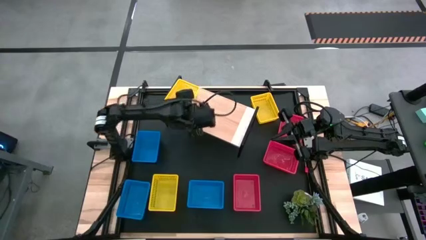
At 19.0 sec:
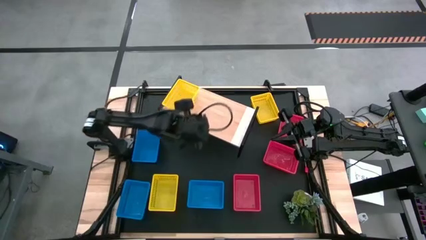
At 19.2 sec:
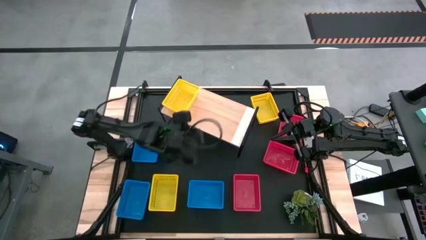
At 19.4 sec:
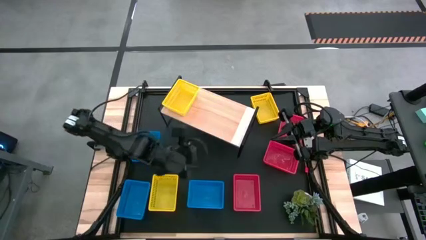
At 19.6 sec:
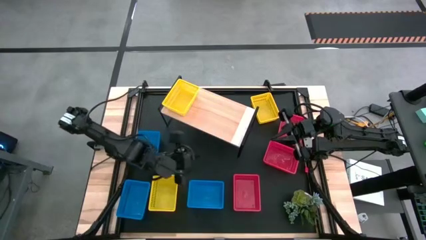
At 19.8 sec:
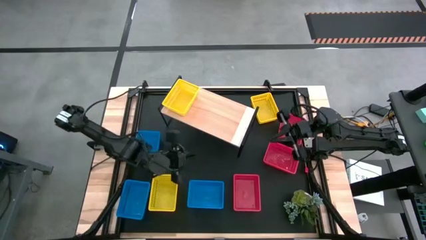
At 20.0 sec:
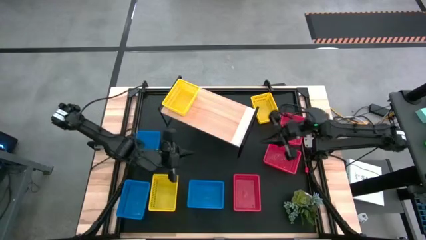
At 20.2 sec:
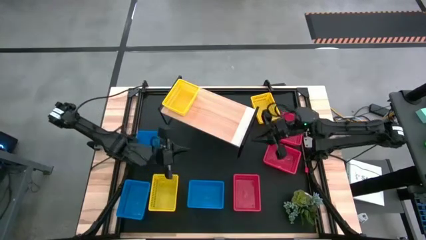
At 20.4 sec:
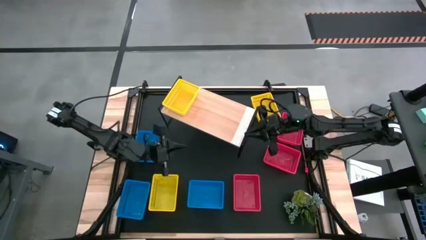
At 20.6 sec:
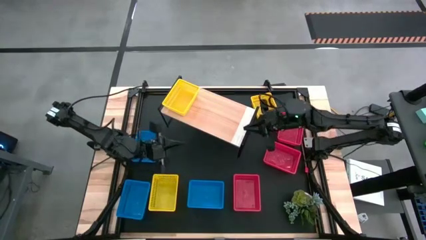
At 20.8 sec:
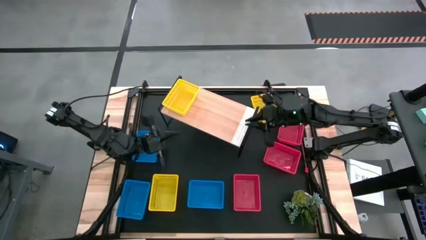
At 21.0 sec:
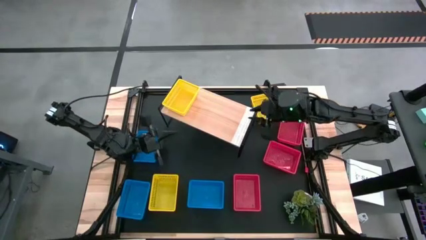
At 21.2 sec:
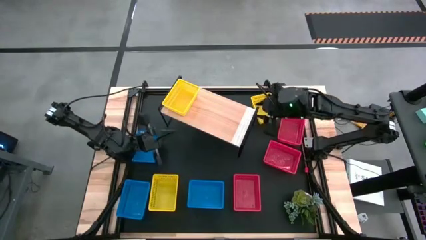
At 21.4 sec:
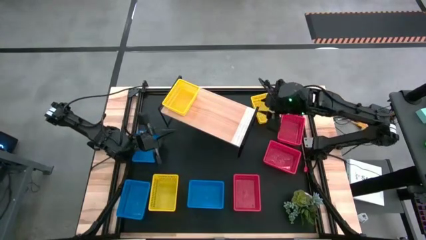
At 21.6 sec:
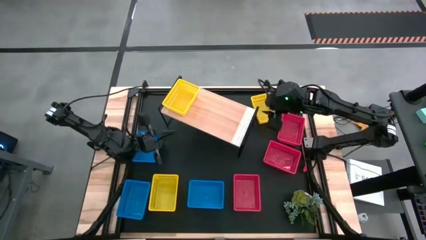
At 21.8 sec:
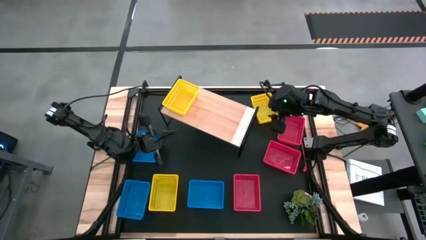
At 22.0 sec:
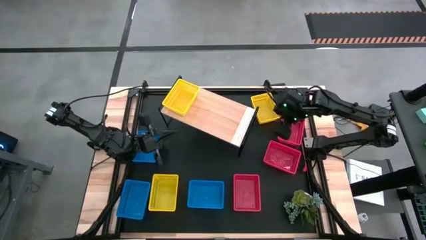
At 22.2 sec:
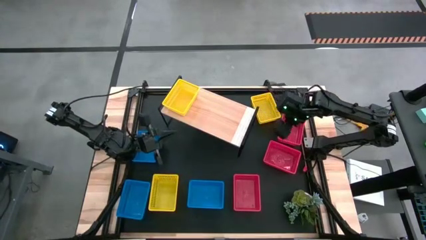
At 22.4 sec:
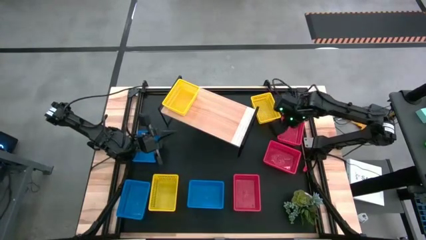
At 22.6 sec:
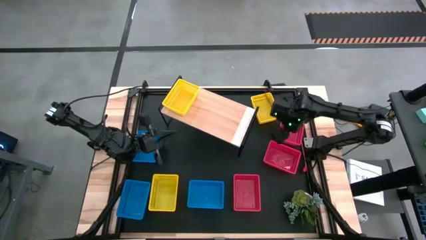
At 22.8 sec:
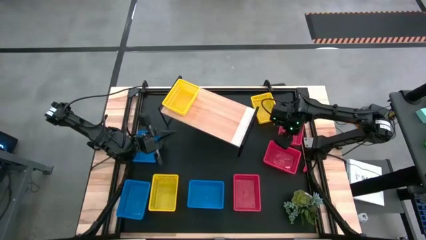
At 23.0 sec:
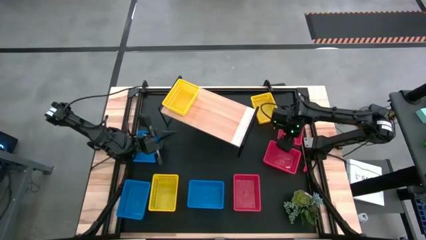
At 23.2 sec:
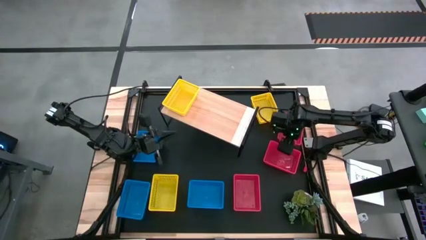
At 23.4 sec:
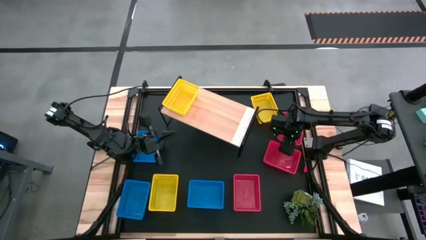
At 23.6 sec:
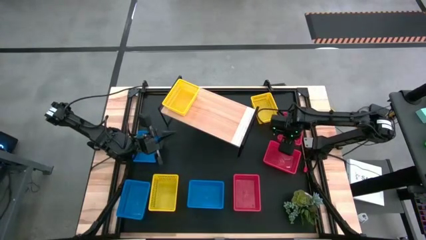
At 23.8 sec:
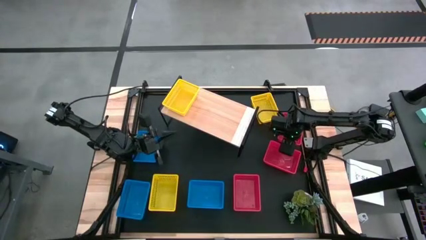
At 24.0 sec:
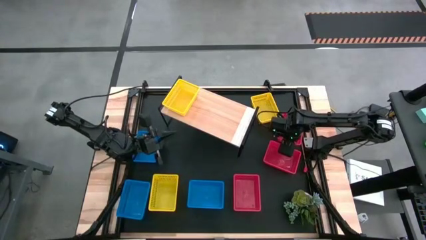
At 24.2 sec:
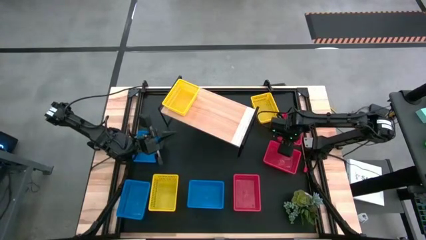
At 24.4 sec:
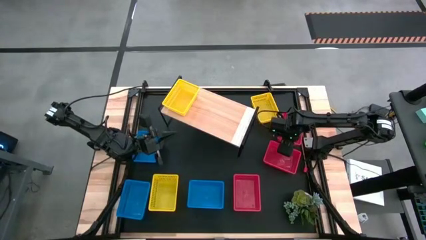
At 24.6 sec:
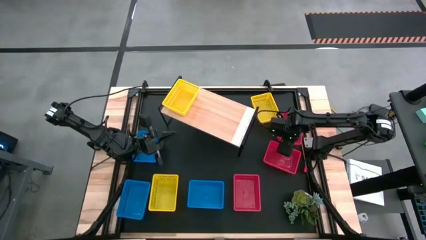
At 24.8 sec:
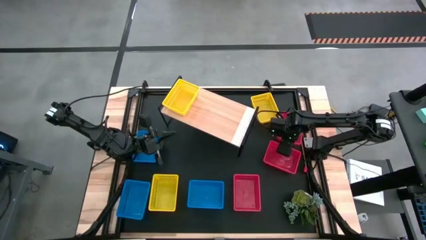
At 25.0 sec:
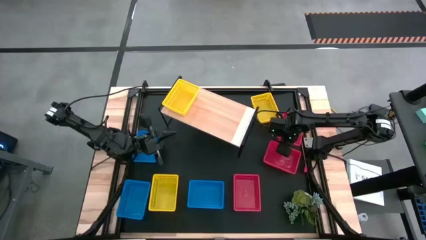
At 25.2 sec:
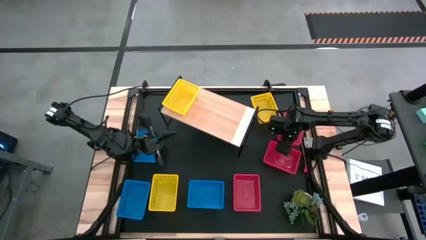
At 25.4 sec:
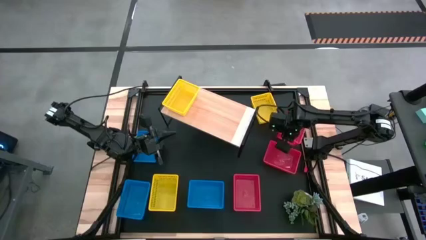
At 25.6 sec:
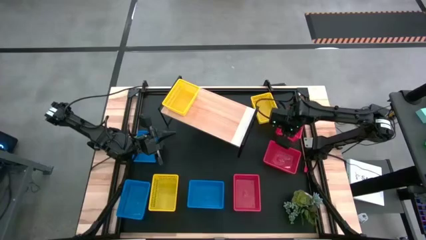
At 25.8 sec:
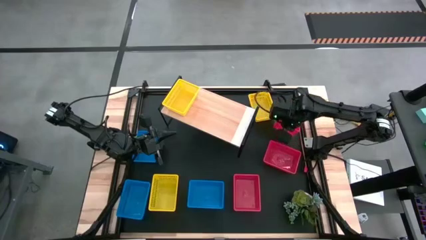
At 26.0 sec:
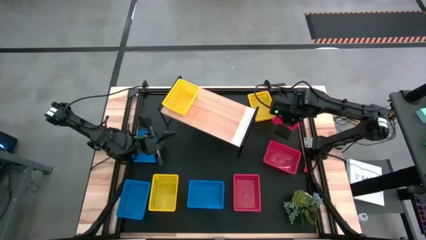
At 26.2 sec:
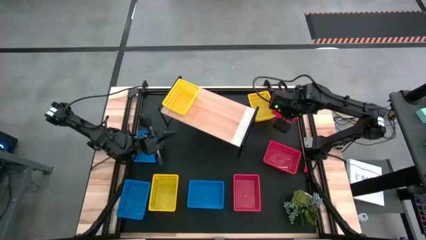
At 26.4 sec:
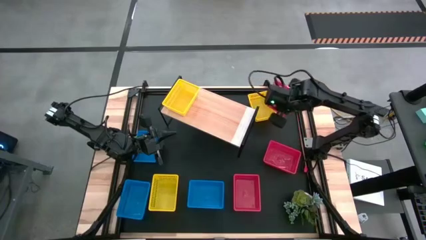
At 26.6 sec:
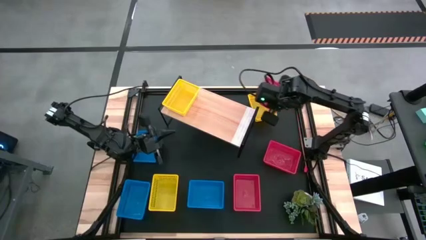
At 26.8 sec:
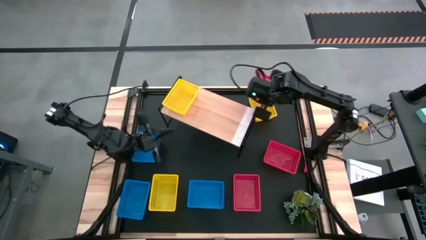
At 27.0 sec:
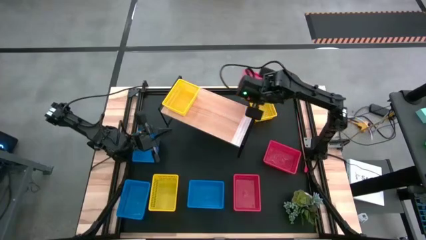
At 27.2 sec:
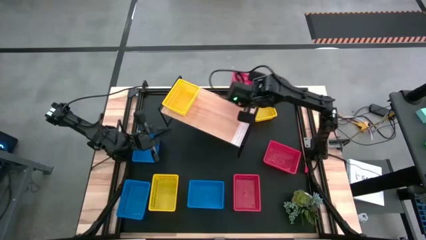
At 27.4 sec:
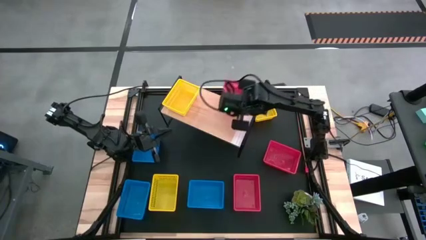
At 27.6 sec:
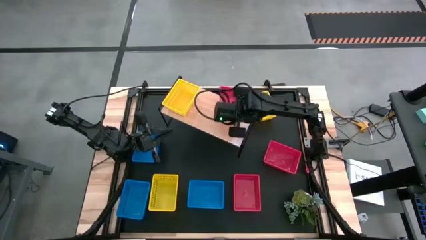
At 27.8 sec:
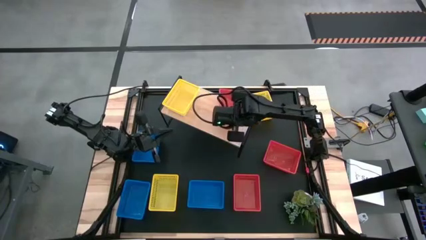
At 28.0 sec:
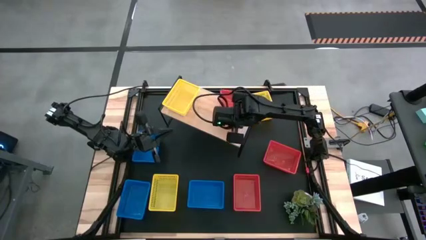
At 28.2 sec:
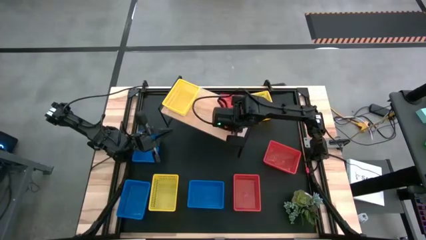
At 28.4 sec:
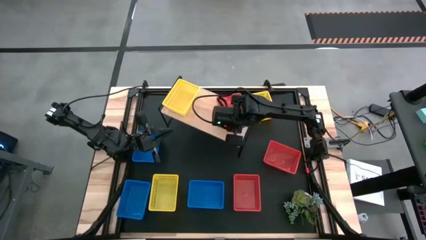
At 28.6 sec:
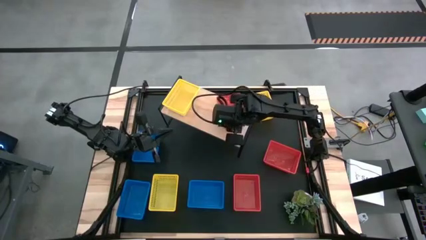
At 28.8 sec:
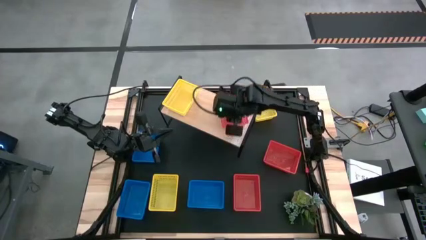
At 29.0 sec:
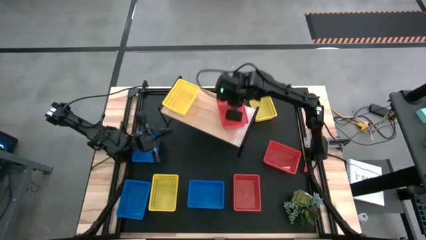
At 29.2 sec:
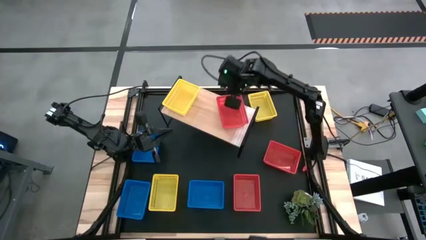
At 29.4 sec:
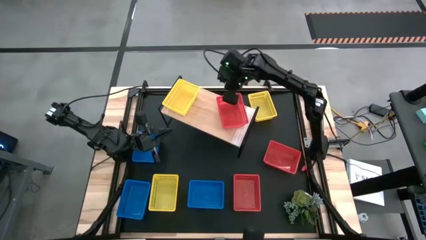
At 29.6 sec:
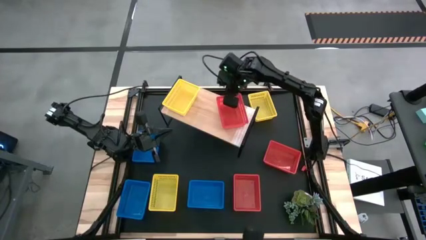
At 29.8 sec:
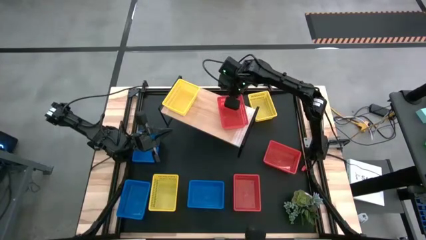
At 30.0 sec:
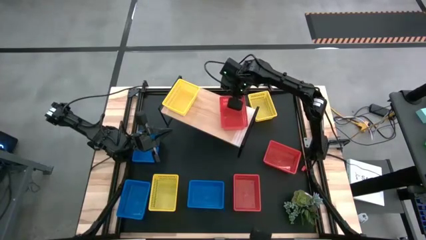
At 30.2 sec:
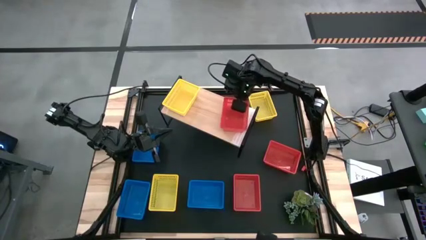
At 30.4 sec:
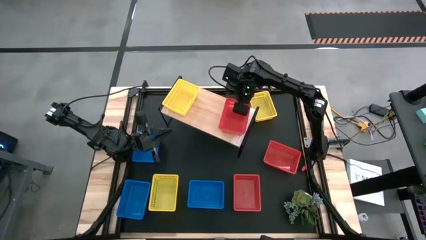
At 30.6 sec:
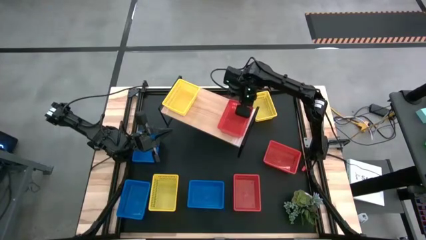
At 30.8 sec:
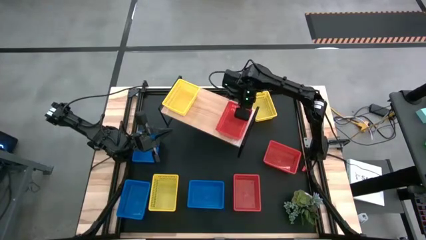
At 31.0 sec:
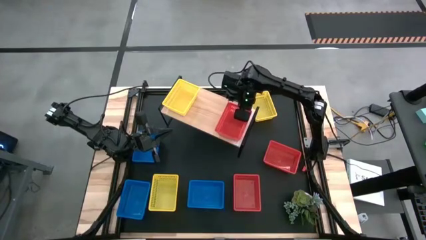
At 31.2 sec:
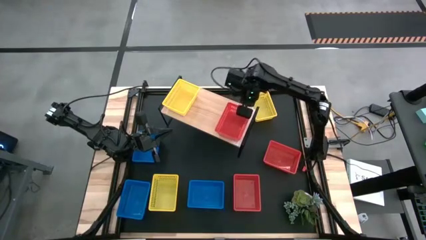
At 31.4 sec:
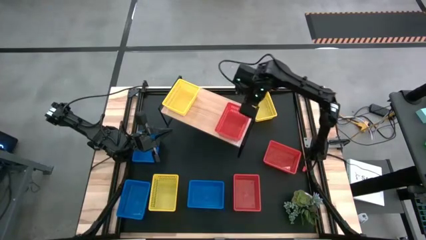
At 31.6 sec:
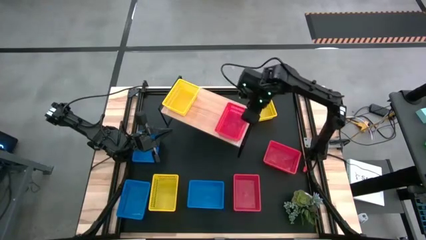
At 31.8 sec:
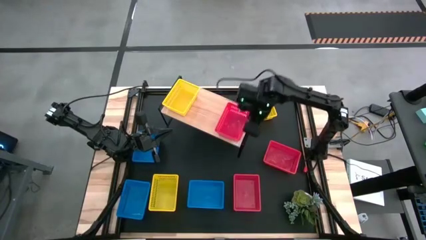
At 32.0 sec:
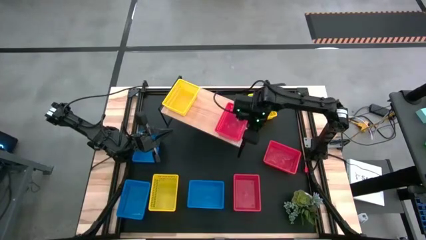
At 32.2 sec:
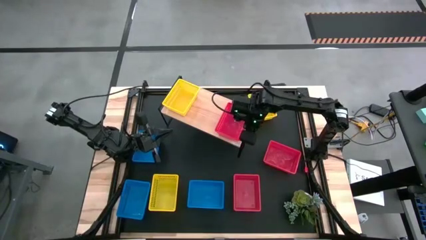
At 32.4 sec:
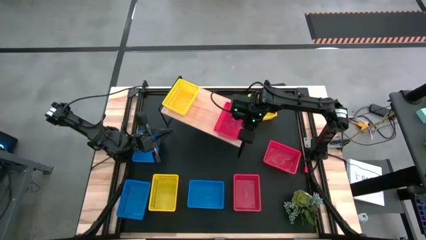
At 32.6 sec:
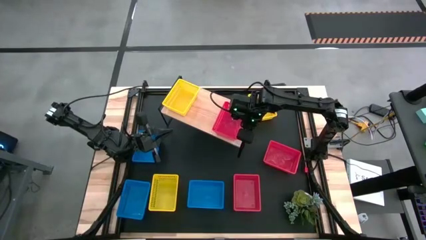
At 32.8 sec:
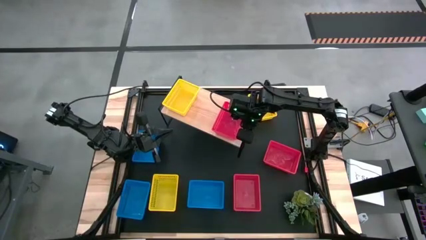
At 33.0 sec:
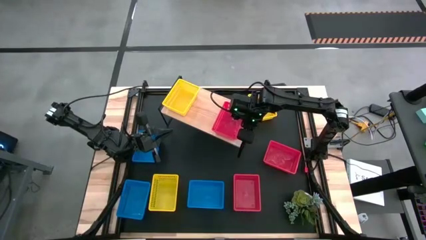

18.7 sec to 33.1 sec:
Task: Stack baskets on shelf by color
Put the top red bin on the shelf

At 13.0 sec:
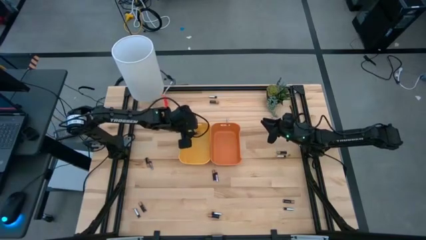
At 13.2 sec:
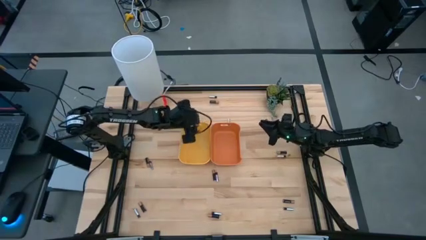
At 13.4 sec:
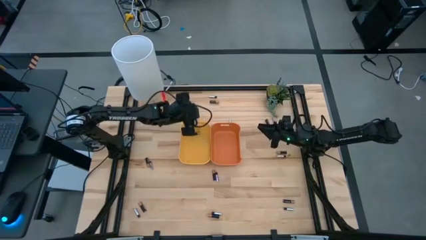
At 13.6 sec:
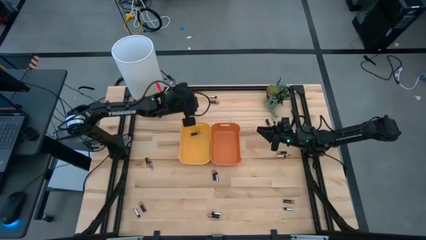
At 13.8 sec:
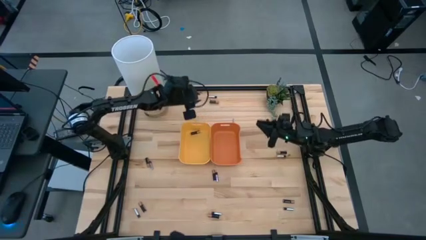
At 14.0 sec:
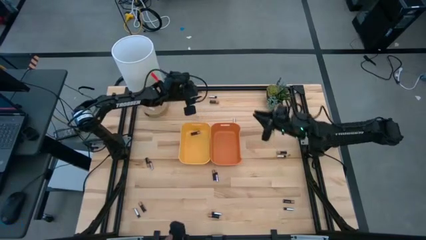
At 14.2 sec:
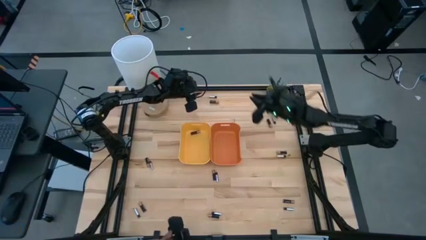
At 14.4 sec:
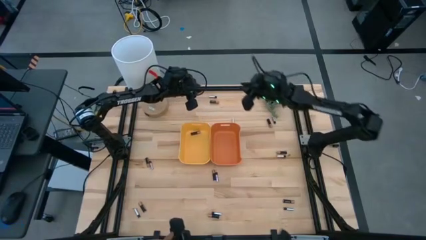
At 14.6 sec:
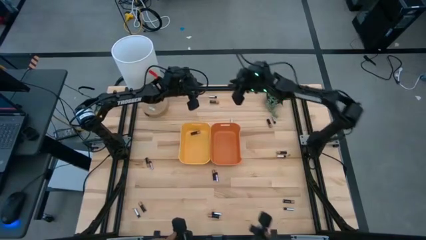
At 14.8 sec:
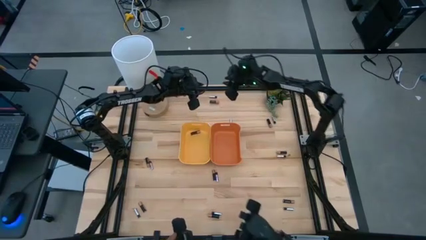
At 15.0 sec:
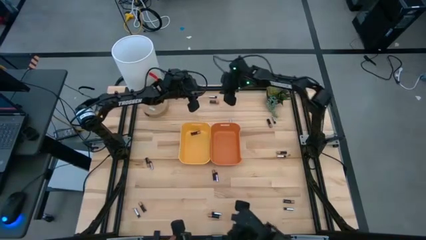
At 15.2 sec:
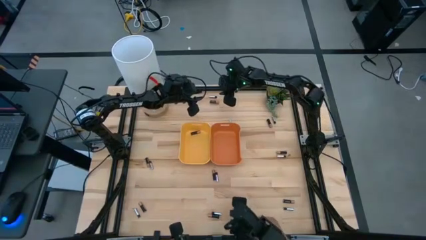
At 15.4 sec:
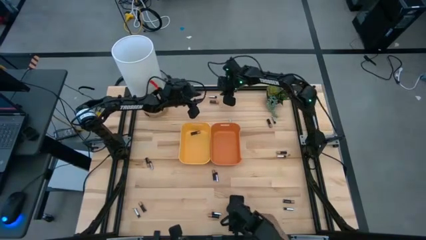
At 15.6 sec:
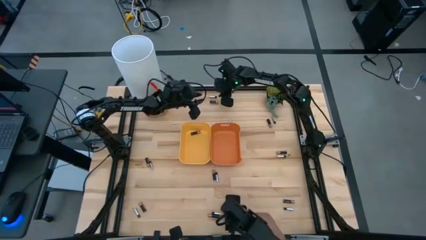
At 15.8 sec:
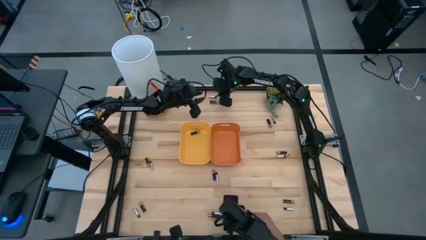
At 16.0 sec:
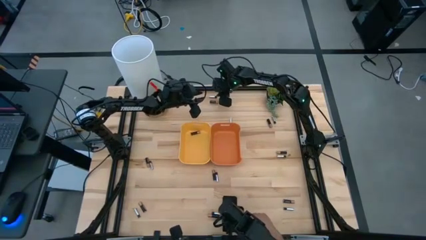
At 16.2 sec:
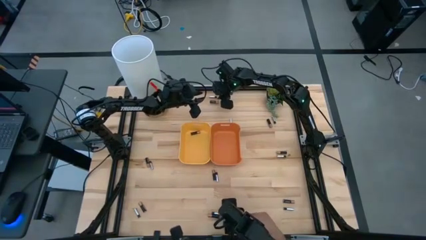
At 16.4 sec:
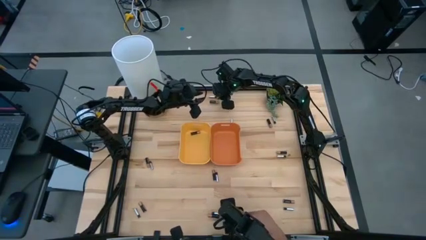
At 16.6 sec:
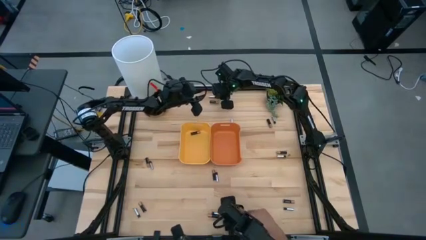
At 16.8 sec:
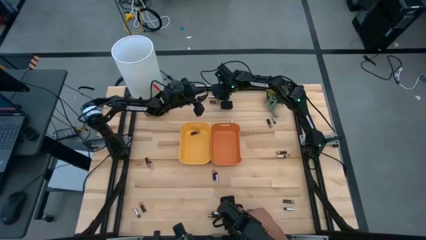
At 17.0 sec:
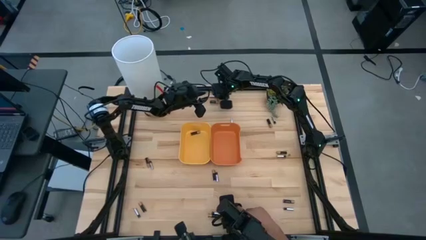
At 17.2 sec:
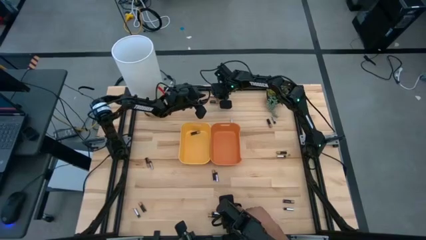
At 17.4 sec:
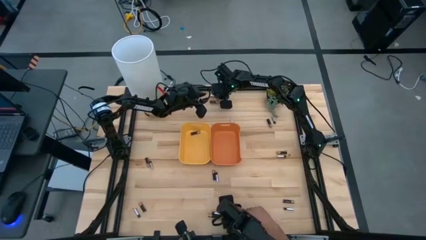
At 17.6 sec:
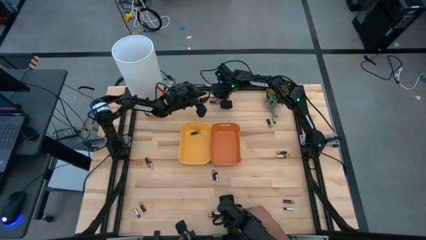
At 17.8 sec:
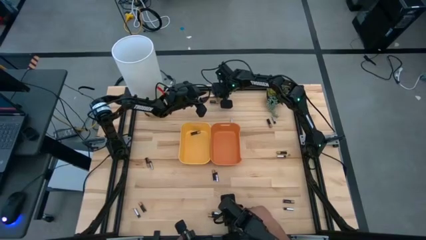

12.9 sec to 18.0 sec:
Task: Sort batteries
Put the top center silver battery into the orange bin
